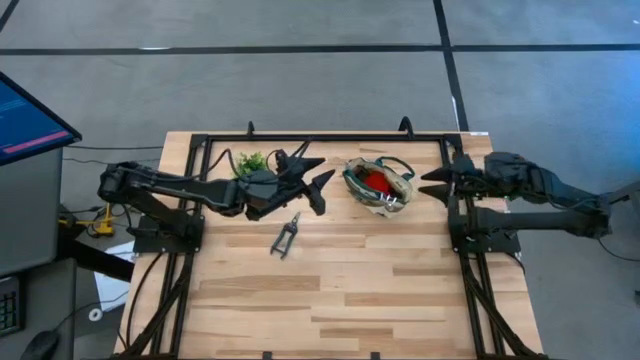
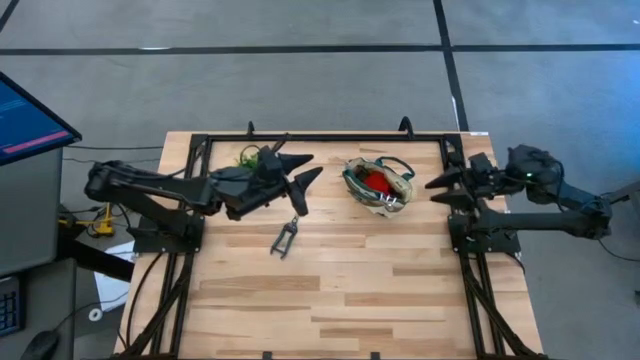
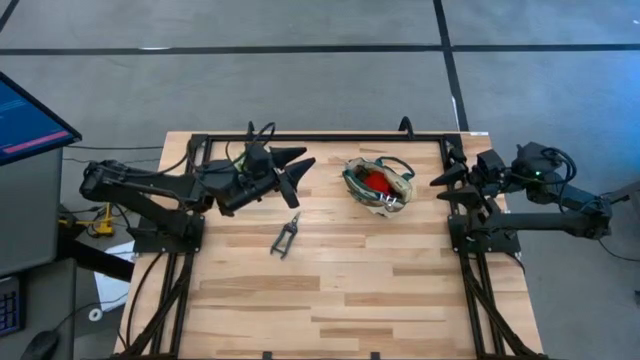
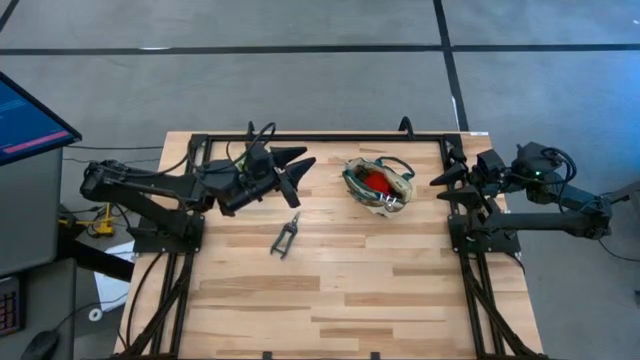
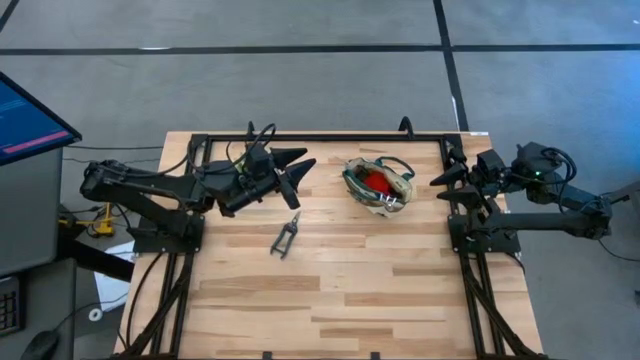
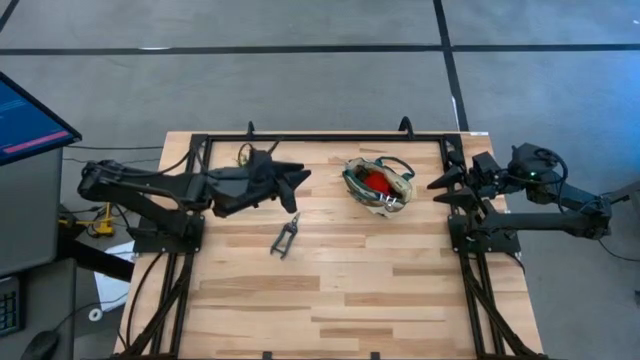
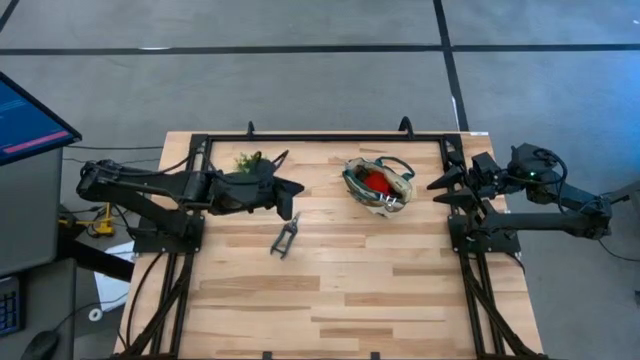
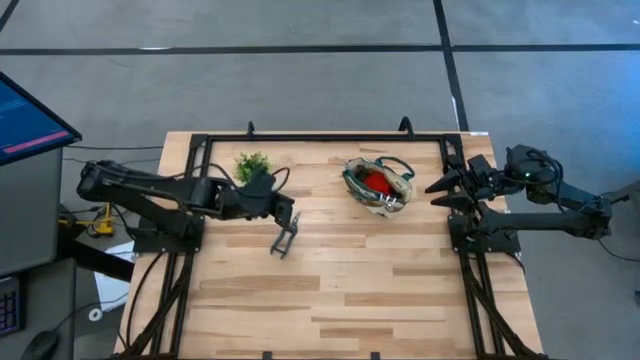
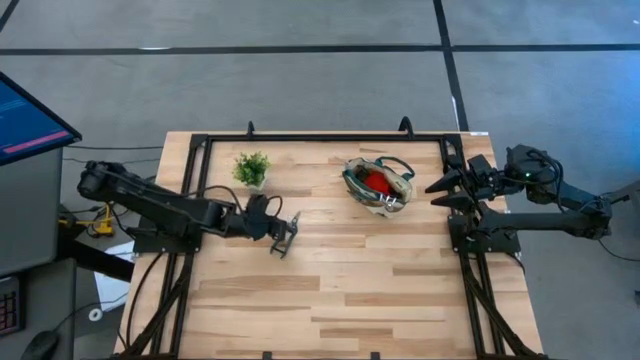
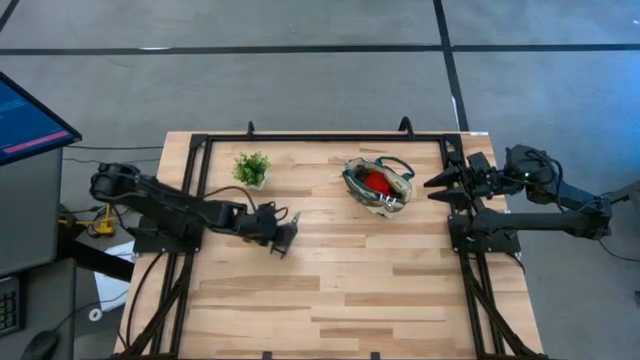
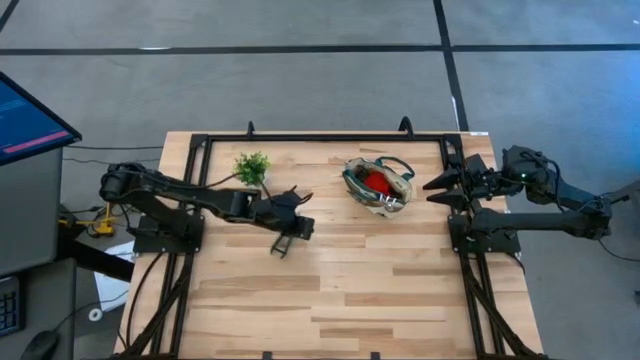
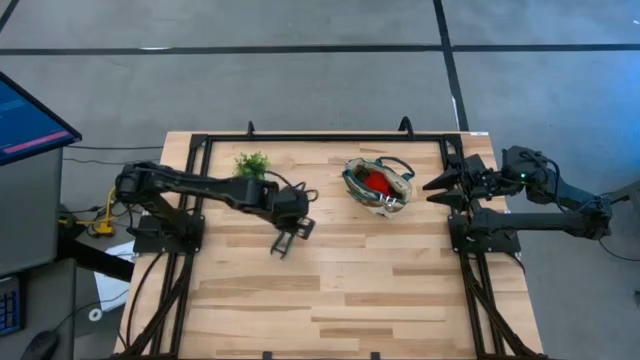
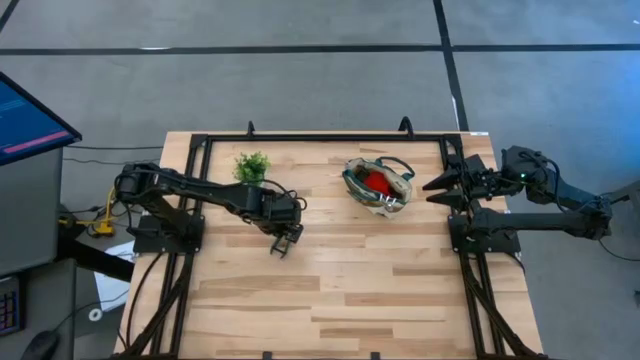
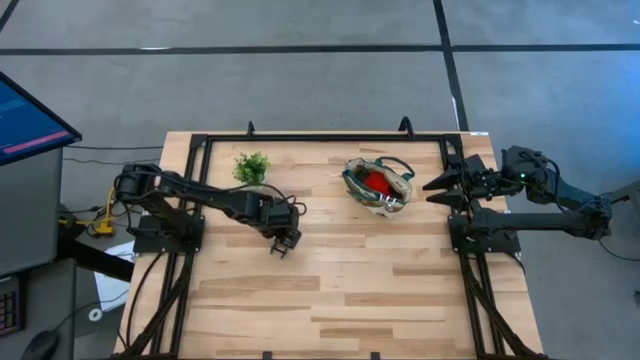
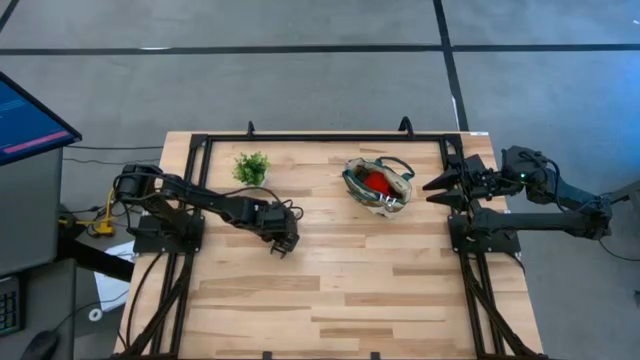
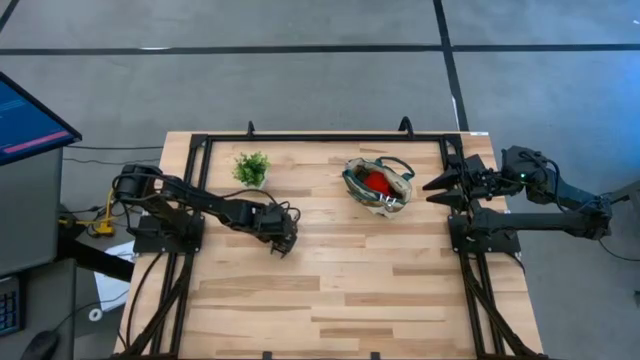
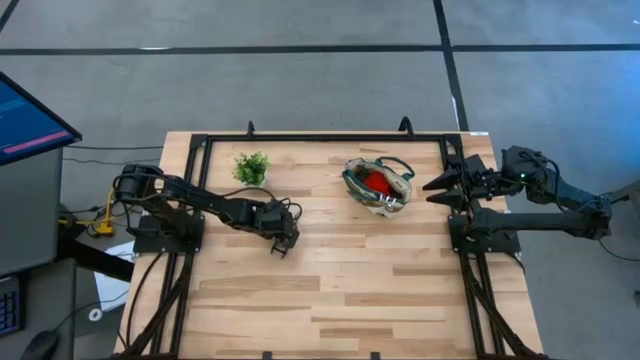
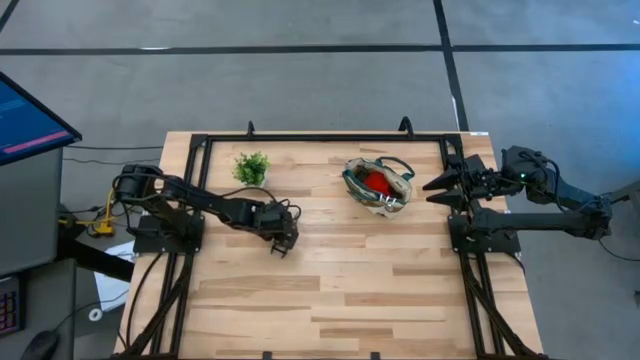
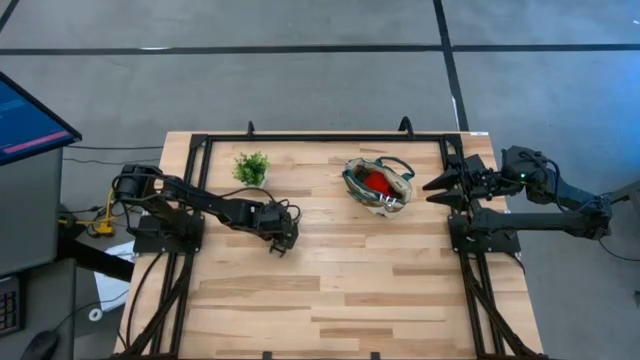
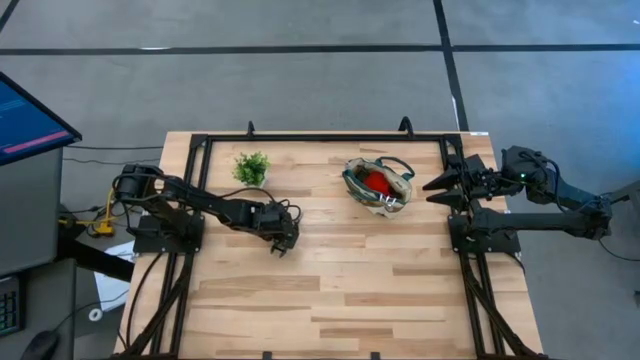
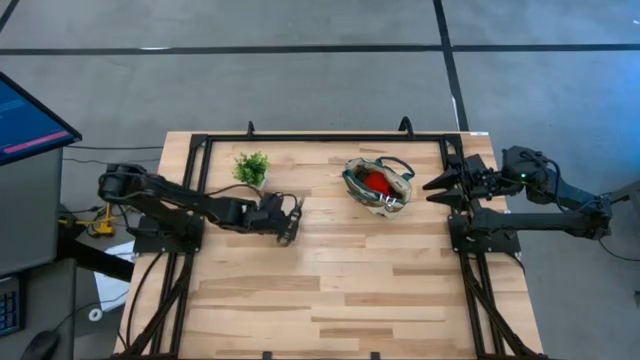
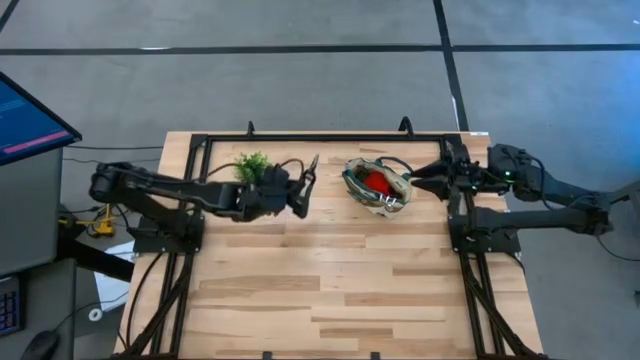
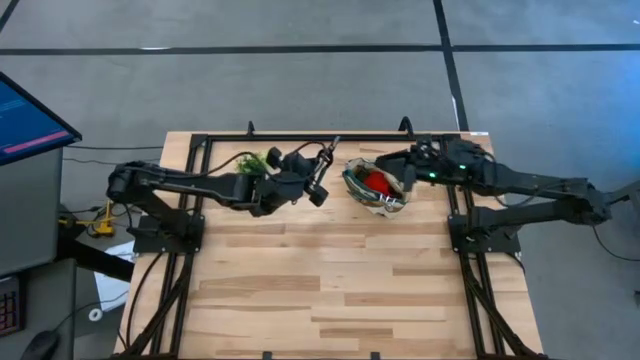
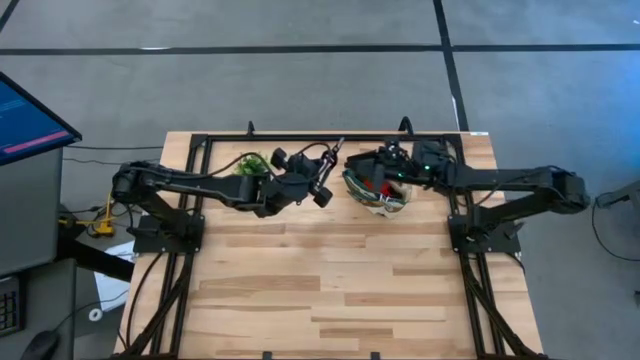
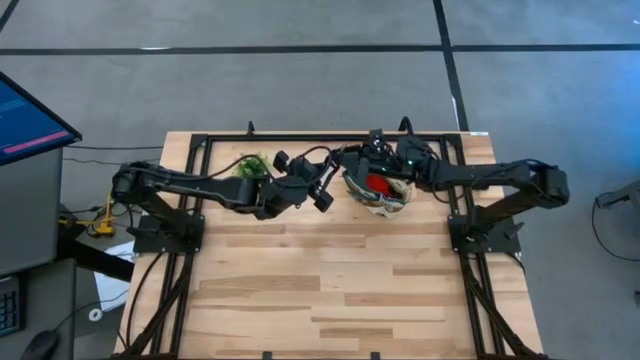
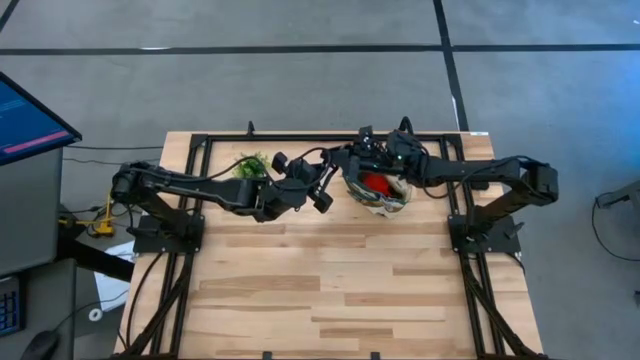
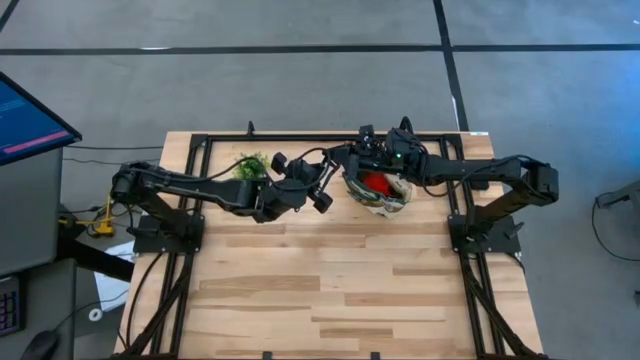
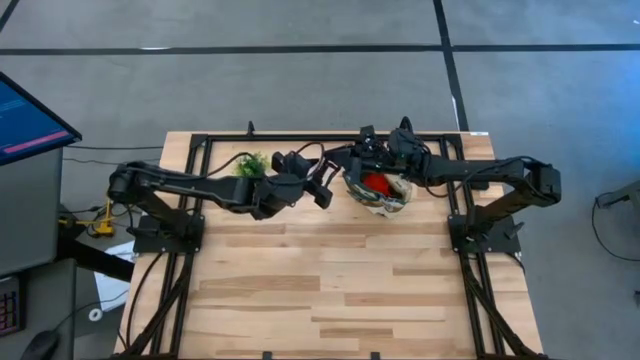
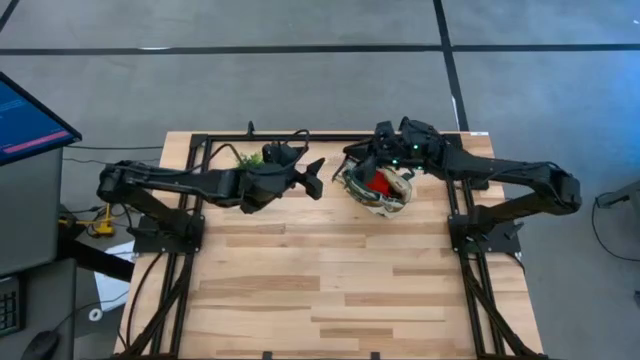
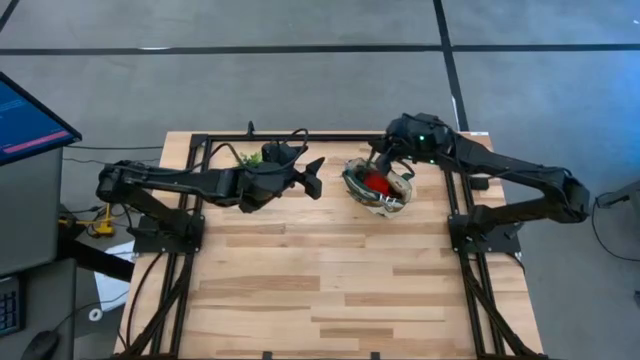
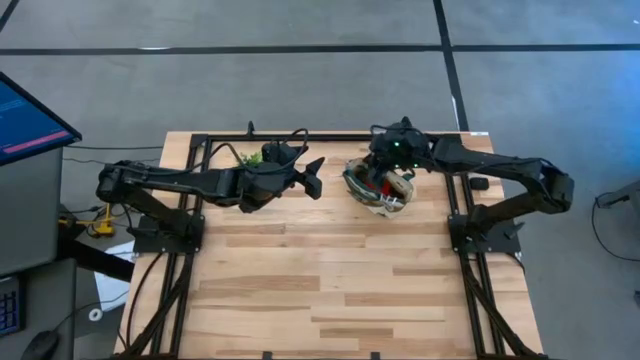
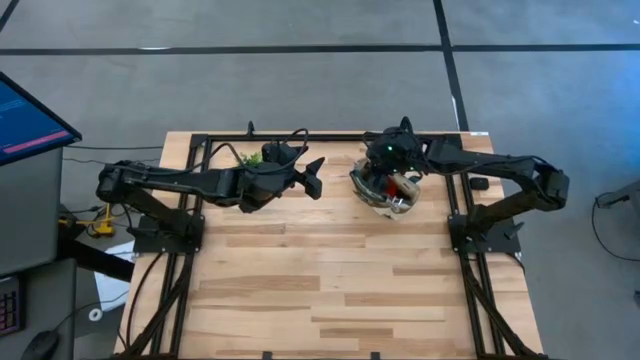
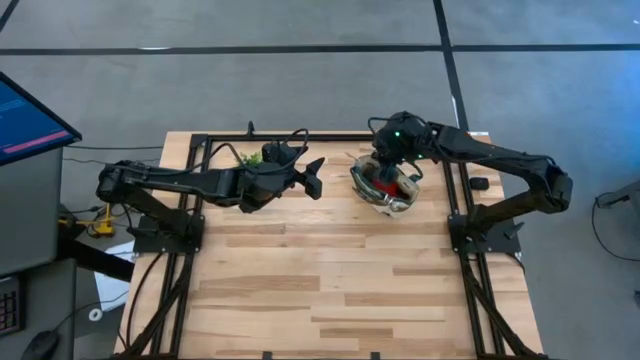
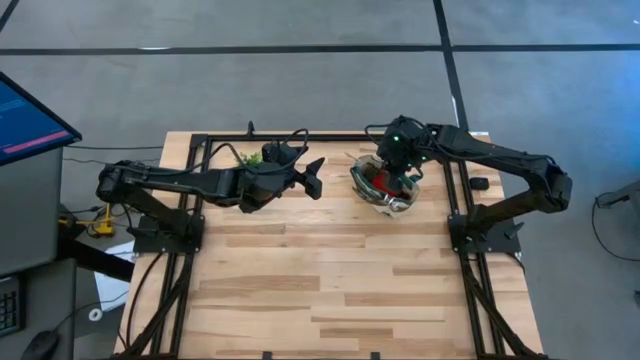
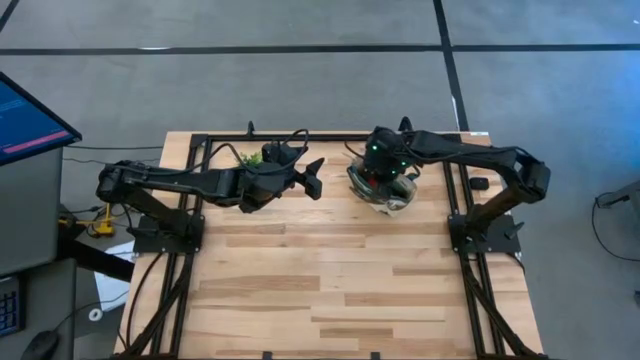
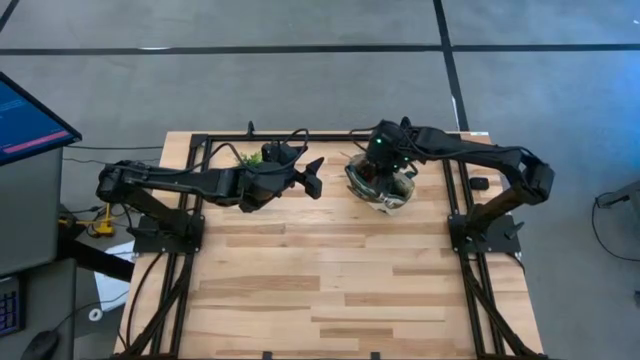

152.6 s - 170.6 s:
Task: Pick & Place Garden tools in Gardening bag
Put the shear scissor into the gardening bag

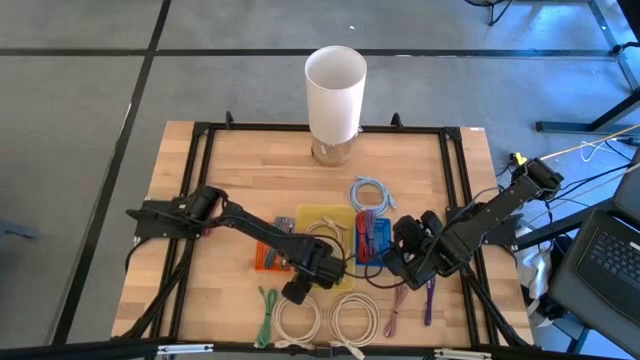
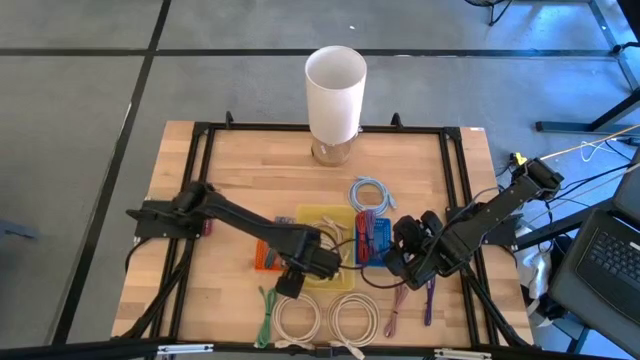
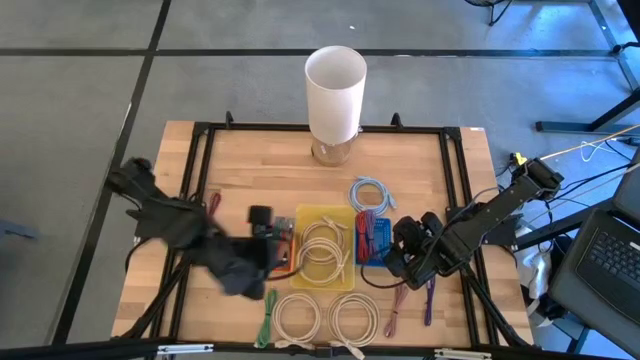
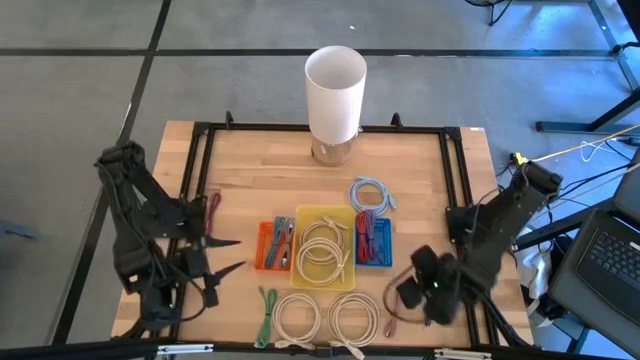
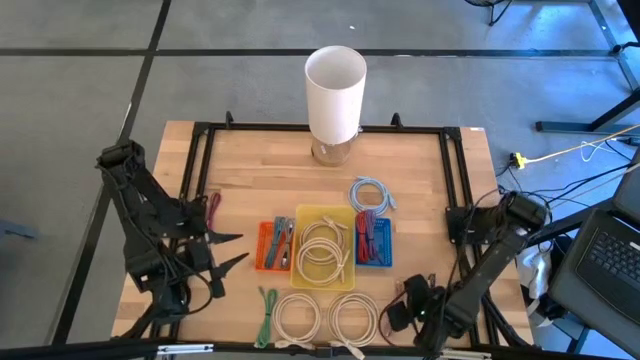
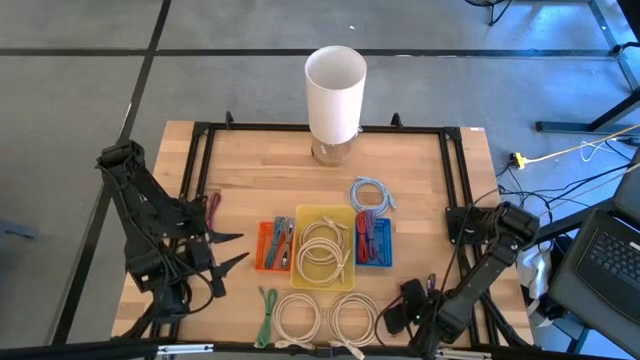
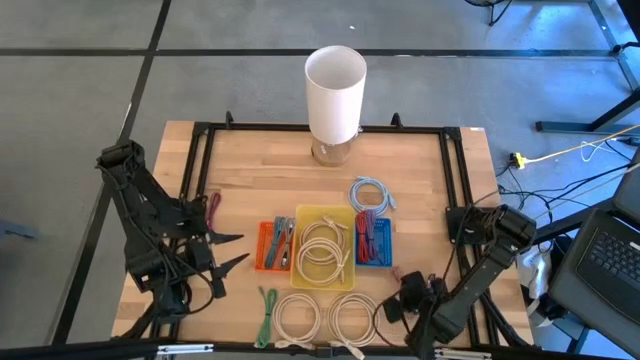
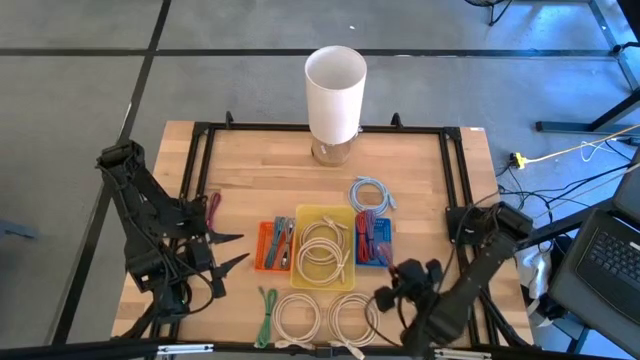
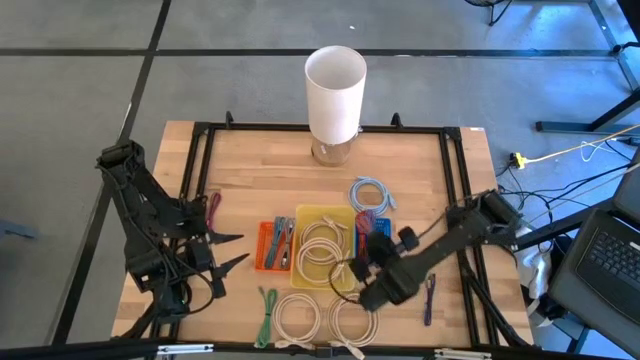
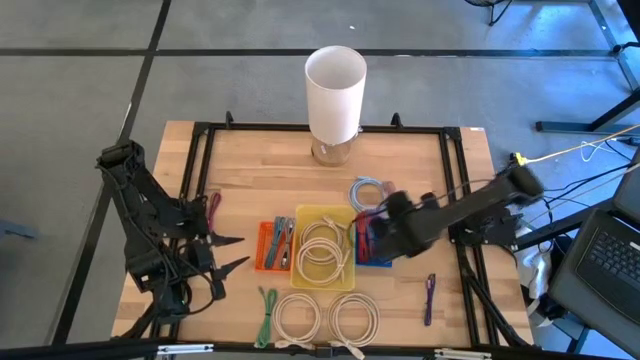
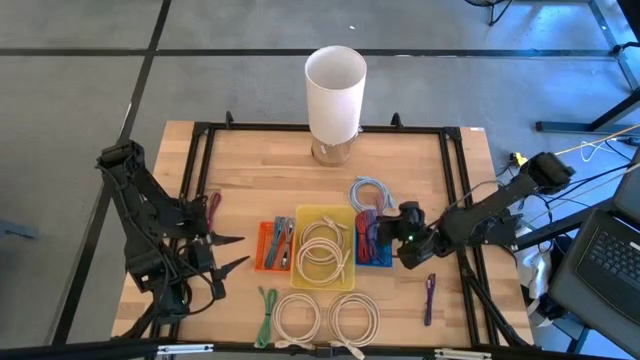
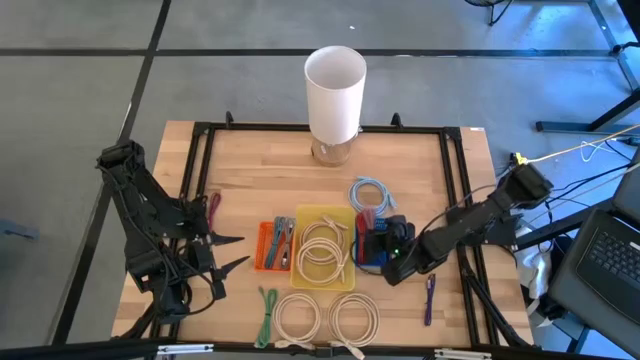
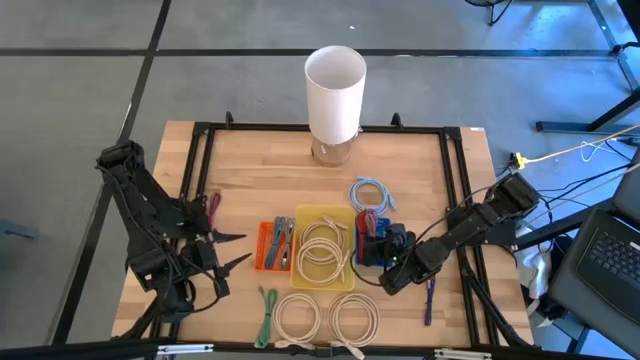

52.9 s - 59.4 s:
Task: Pick & Place USB Port
Put the pink charger cable into the blue bin
